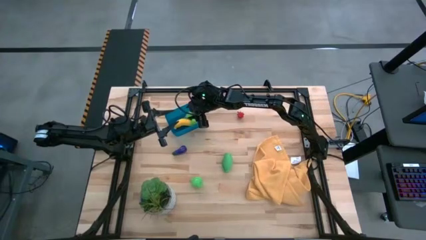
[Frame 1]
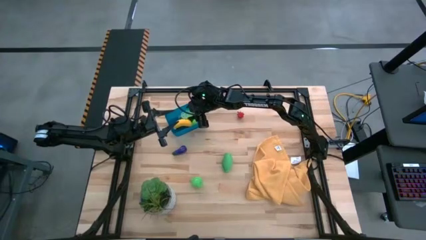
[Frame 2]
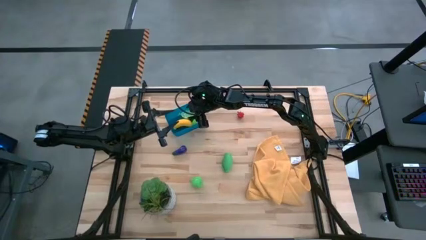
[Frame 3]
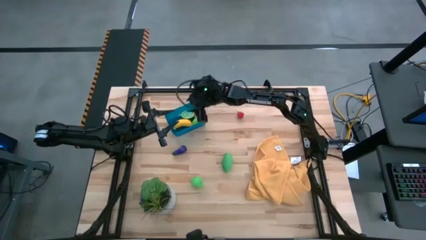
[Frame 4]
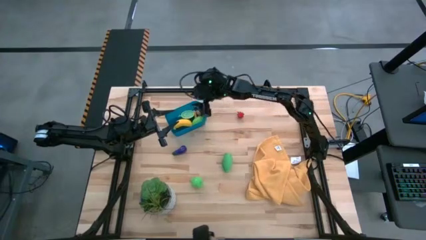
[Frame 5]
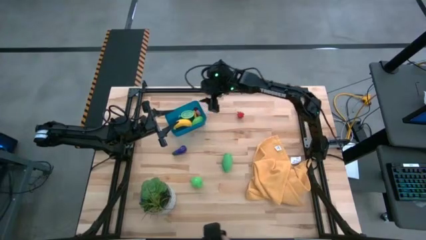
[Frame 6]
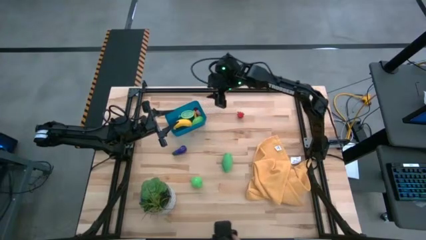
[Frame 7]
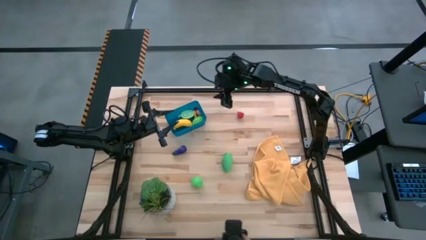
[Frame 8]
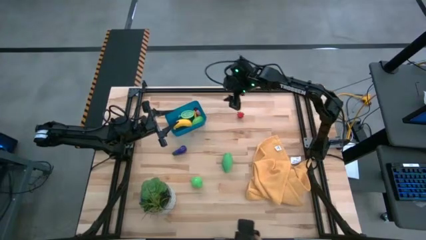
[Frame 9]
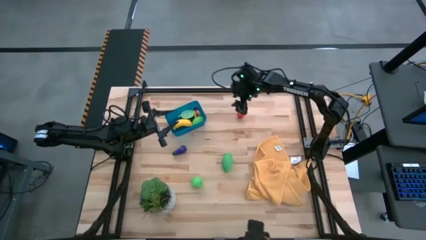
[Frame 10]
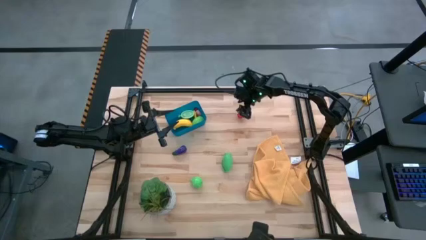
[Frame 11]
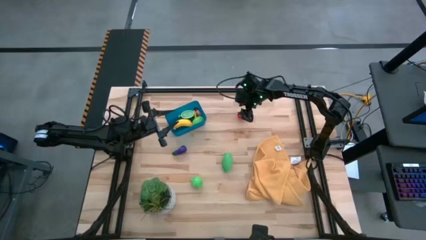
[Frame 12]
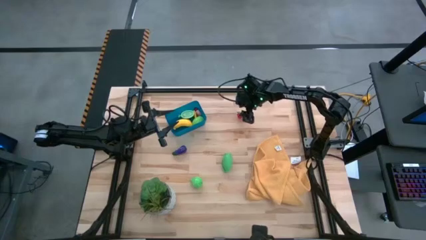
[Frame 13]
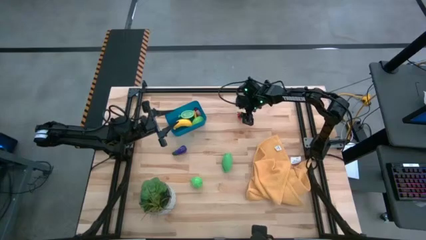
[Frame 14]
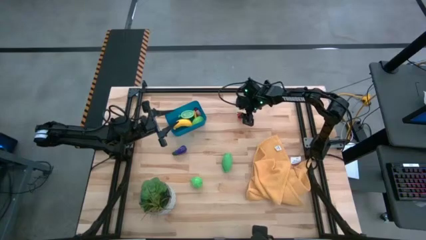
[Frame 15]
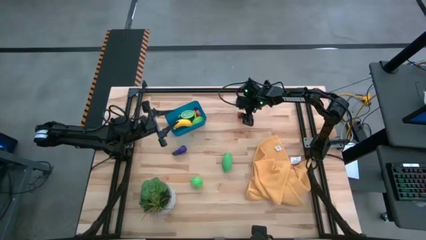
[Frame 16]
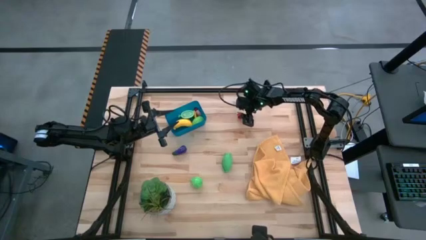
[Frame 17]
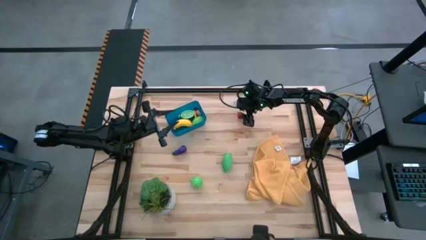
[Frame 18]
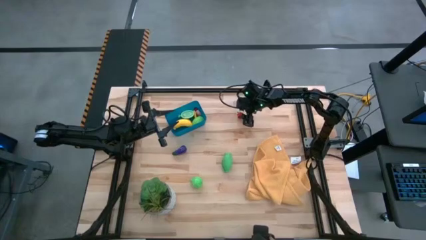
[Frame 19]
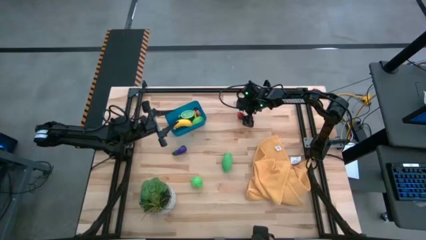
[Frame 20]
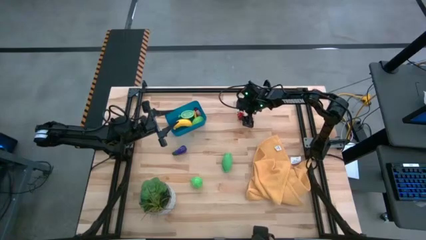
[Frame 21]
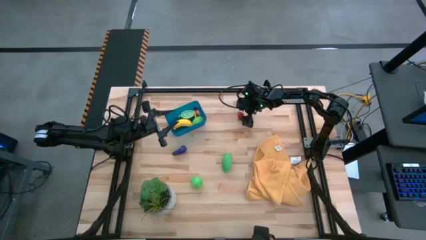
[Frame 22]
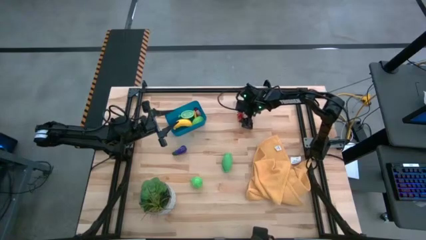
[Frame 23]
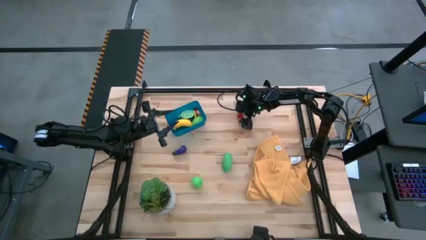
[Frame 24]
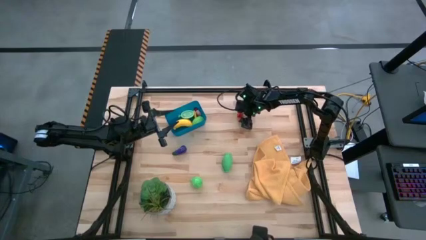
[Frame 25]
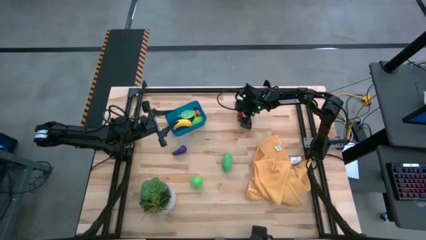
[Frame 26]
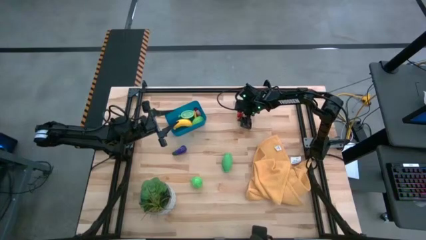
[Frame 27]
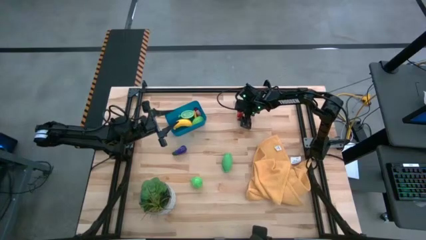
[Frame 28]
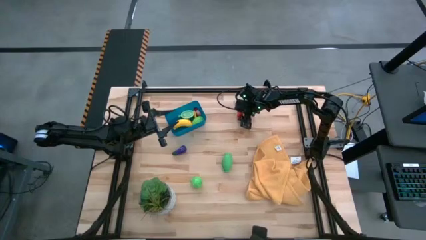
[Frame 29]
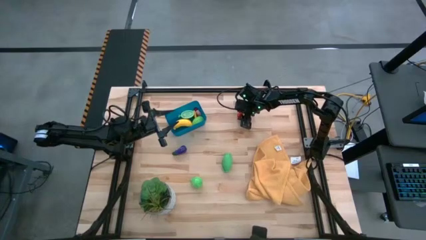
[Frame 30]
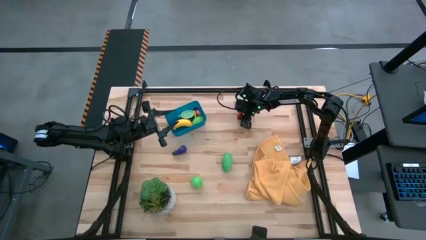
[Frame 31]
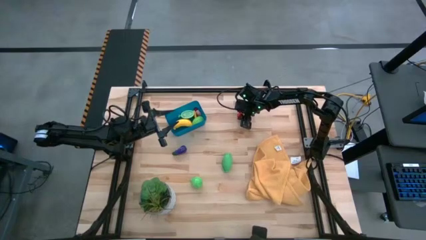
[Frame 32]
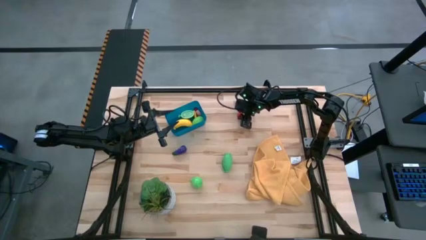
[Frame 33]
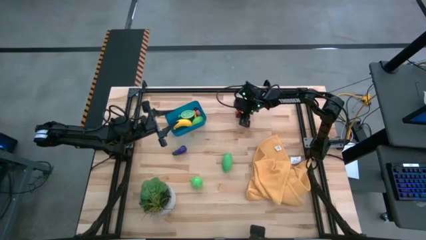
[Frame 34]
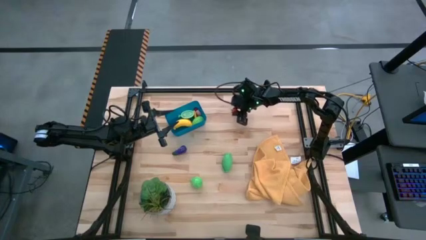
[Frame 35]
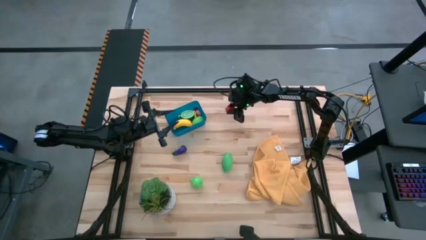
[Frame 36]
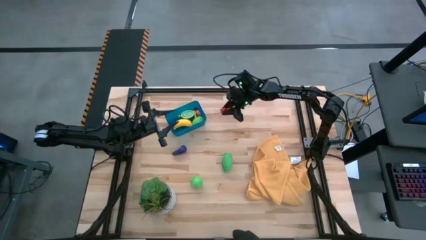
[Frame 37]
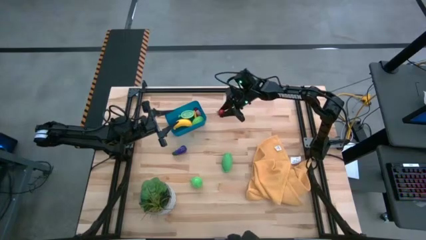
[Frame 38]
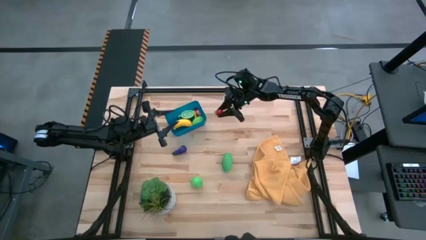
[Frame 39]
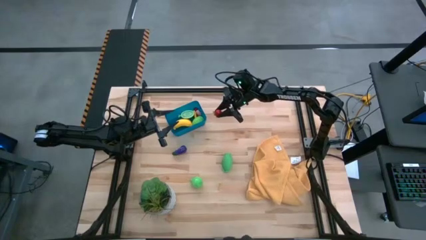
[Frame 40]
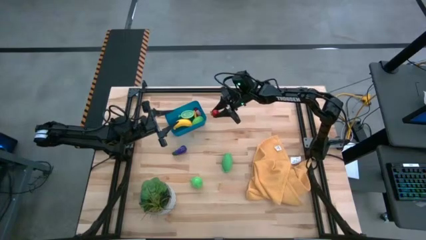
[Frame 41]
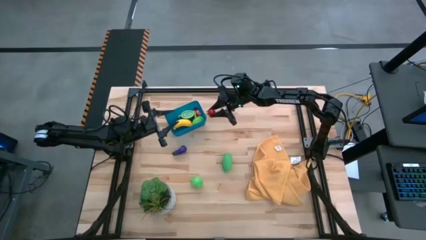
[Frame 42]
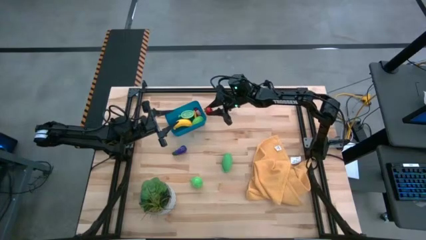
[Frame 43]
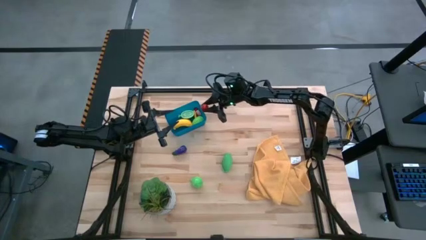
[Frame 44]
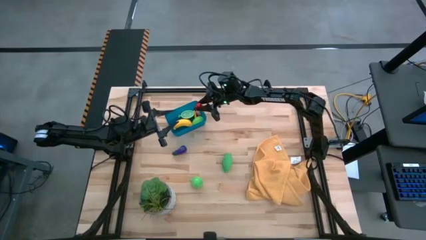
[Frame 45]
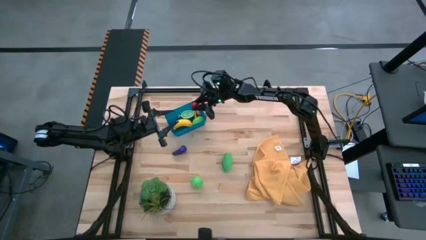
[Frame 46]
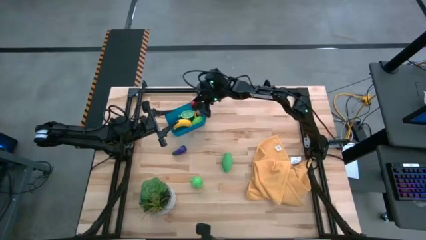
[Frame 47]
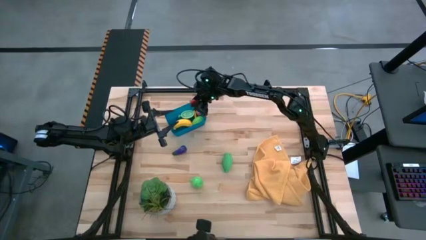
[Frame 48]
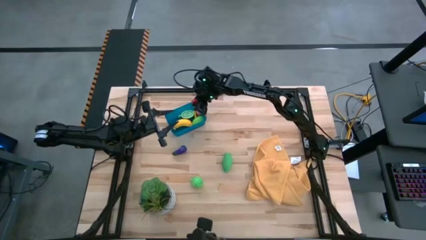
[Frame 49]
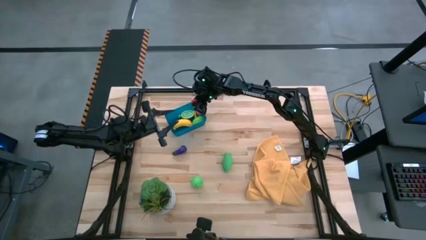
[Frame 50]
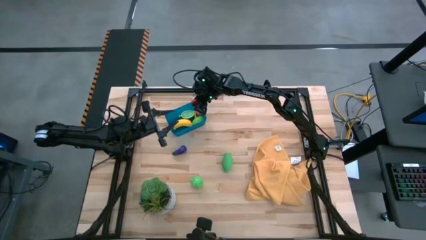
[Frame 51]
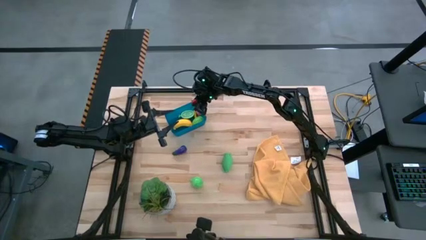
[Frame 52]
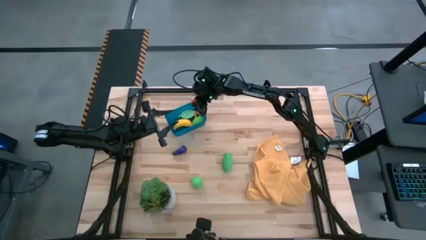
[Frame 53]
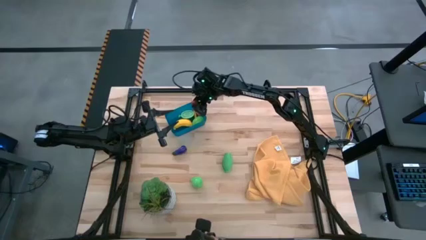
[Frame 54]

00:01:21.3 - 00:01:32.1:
Task: Pick and placing Produce into tupperware
Put the strawberry into the blue bin

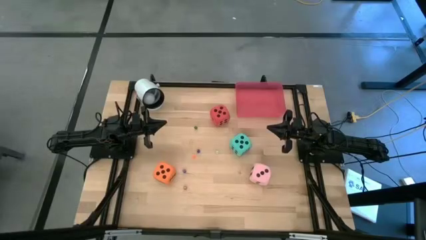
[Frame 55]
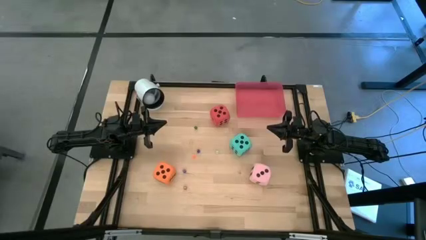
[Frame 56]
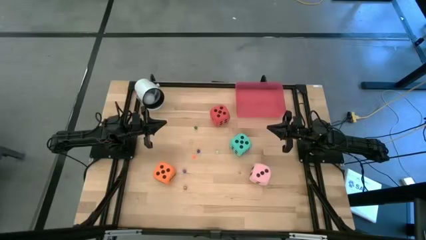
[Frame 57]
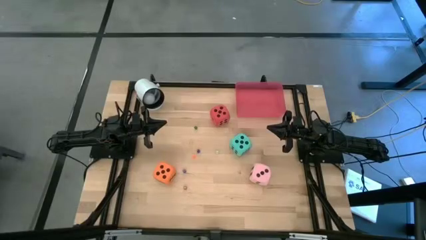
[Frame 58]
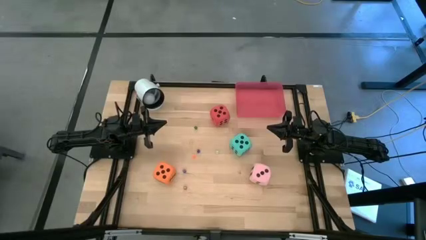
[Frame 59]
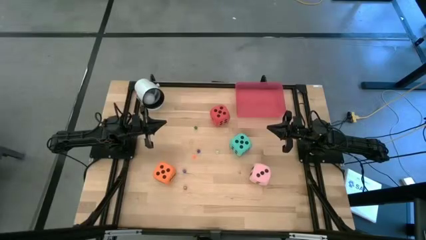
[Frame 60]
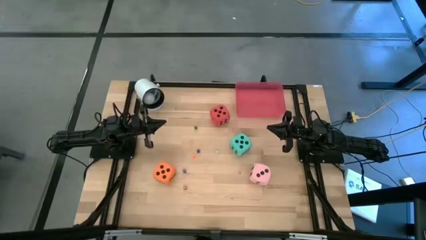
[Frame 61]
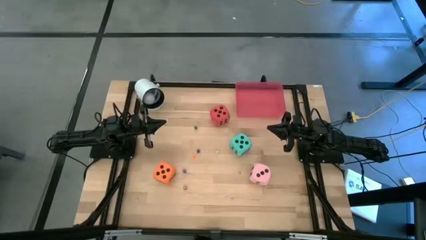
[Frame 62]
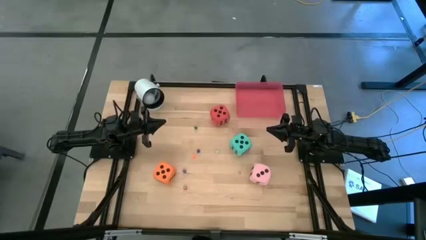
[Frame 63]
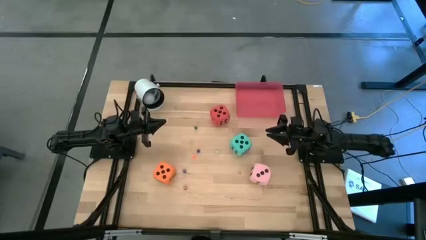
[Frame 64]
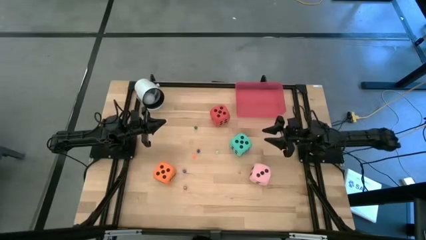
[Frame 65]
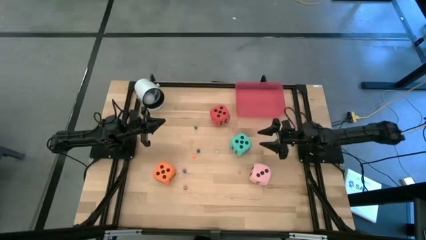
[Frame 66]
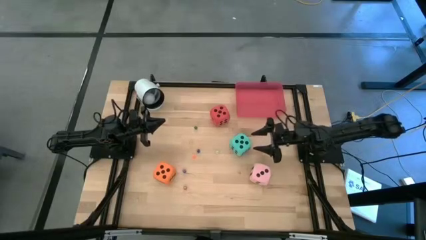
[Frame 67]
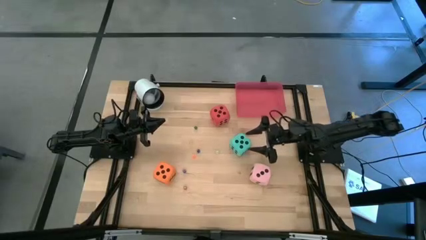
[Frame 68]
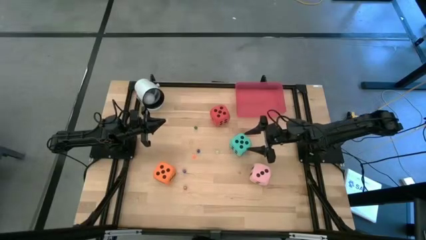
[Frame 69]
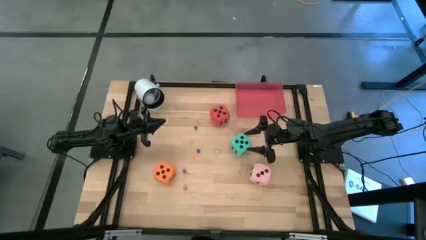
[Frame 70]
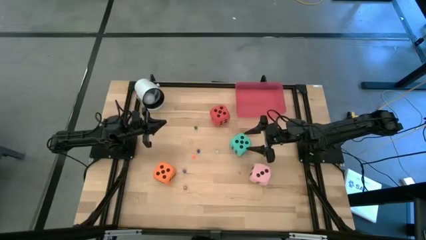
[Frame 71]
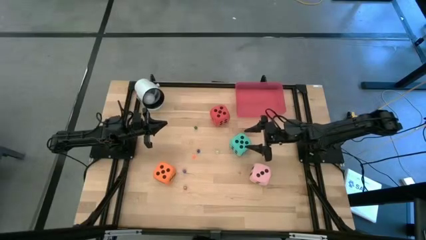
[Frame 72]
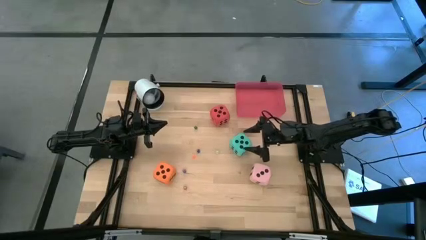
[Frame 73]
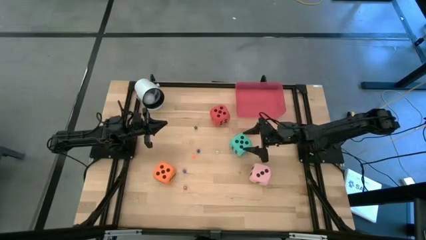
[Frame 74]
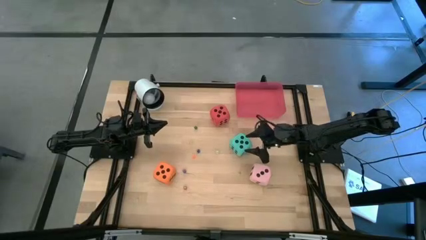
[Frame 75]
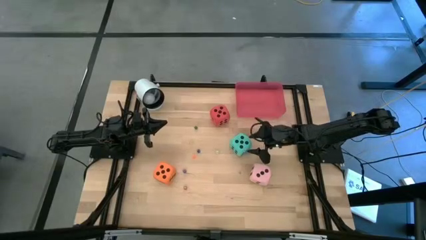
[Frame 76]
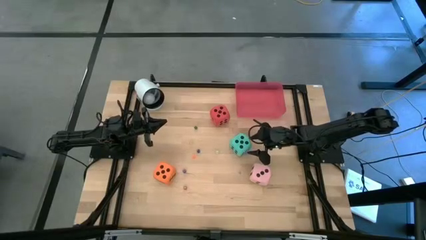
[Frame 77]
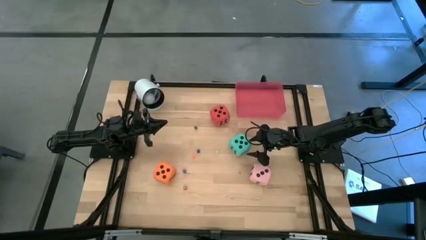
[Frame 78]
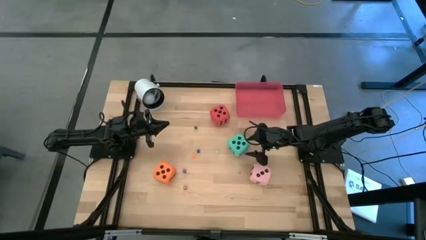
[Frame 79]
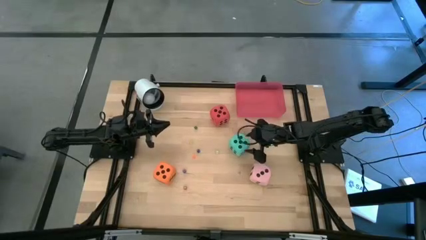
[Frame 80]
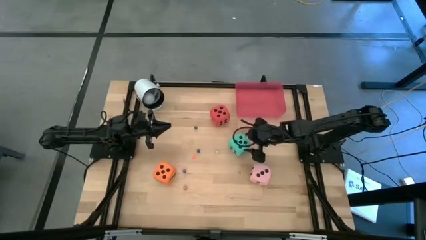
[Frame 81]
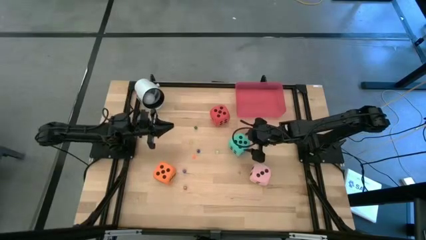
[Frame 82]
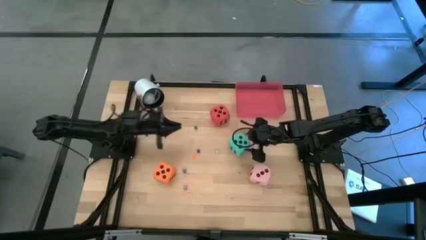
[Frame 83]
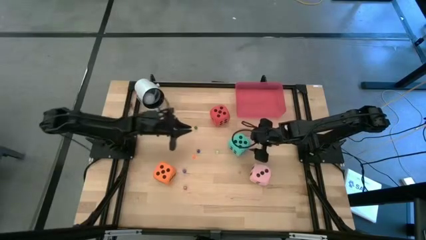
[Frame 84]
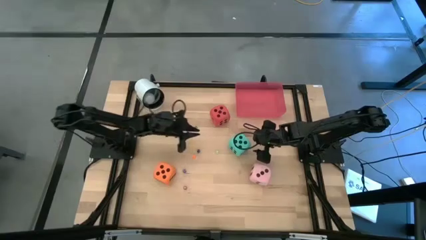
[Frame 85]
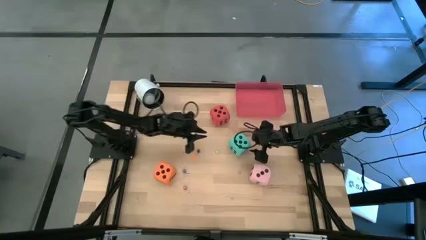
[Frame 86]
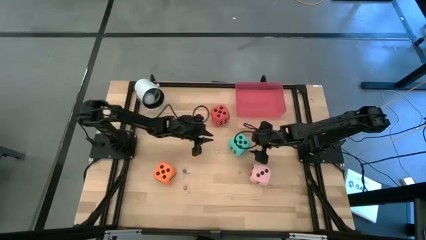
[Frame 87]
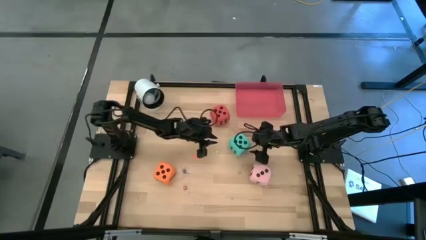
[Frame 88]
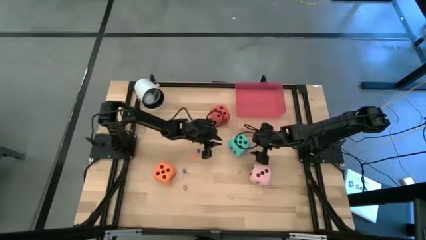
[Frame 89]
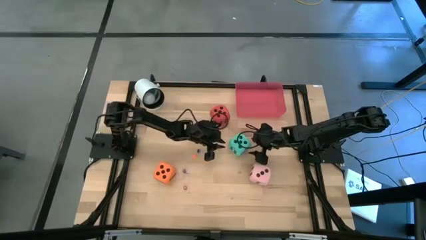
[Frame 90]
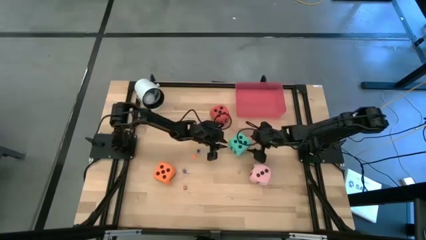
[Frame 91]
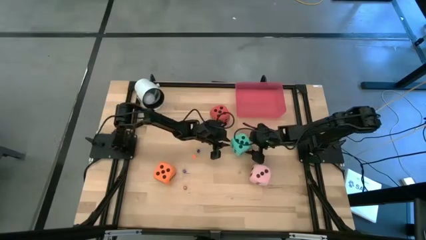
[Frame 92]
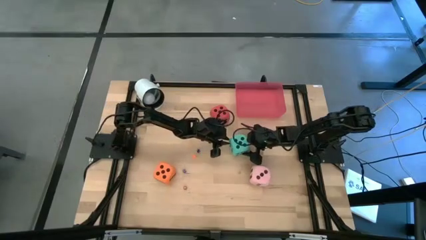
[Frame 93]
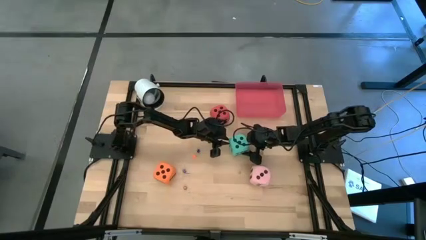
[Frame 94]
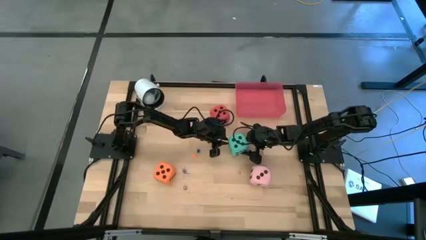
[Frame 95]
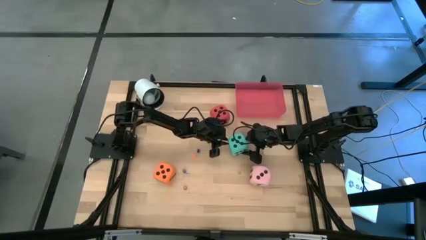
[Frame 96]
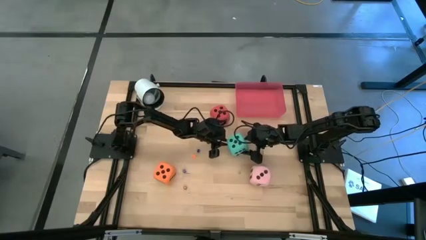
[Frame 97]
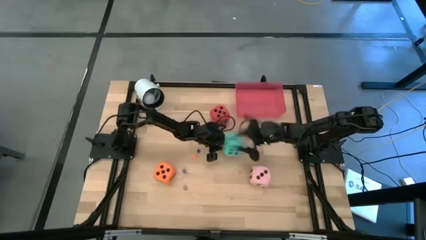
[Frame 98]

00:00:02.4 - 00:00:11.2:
Task: Pick & Place Dice
Put the large blue dice into the red bin
